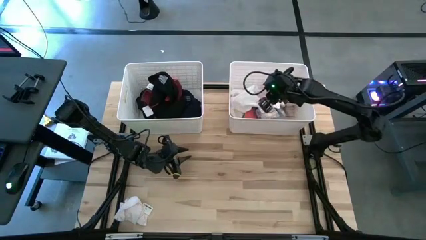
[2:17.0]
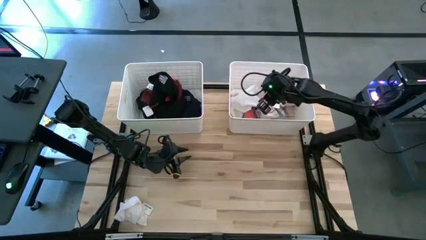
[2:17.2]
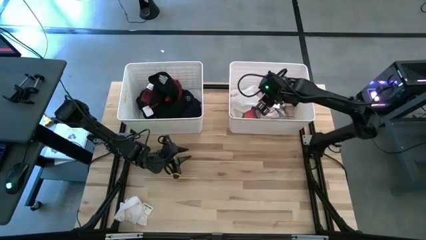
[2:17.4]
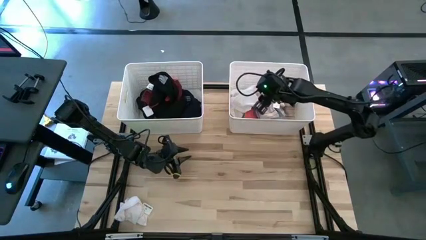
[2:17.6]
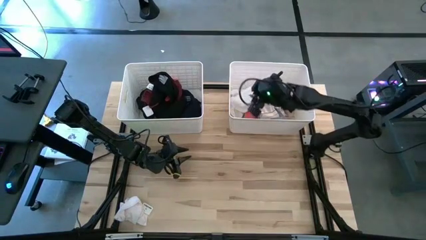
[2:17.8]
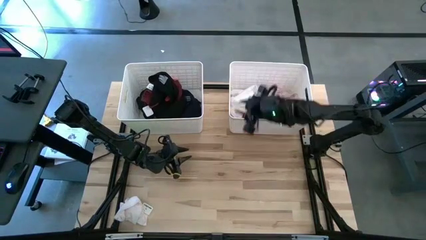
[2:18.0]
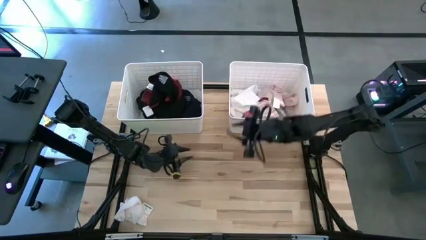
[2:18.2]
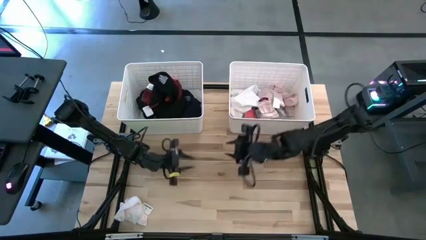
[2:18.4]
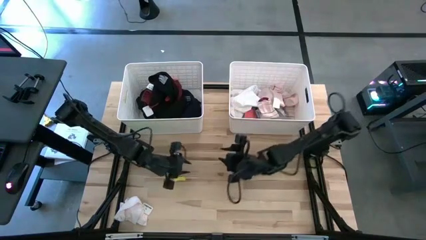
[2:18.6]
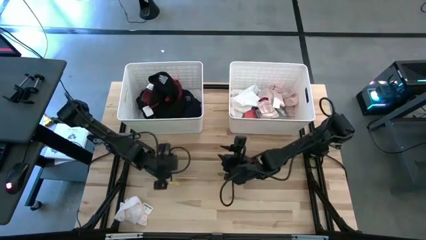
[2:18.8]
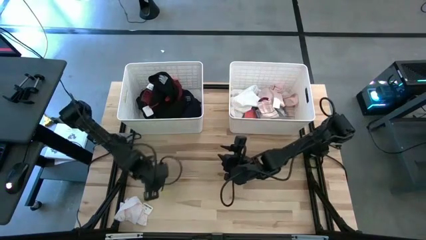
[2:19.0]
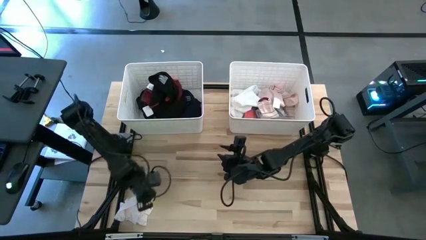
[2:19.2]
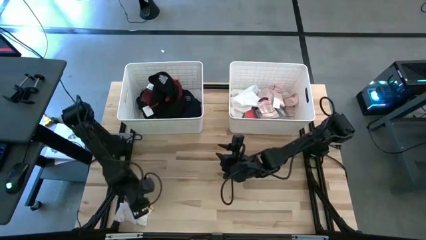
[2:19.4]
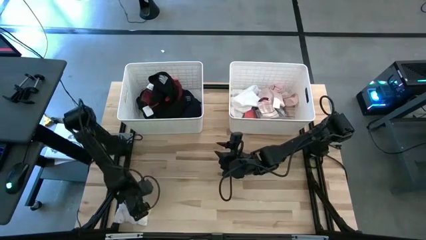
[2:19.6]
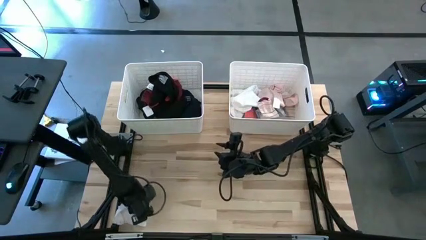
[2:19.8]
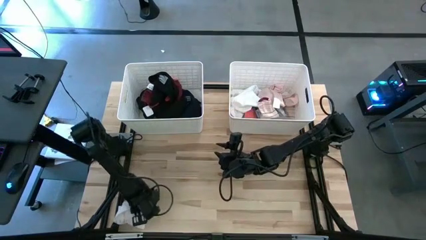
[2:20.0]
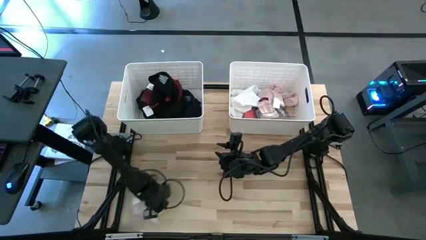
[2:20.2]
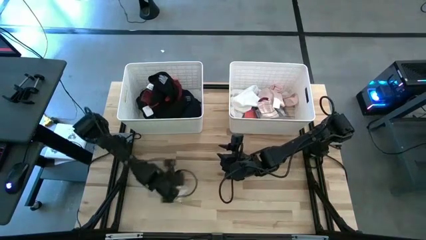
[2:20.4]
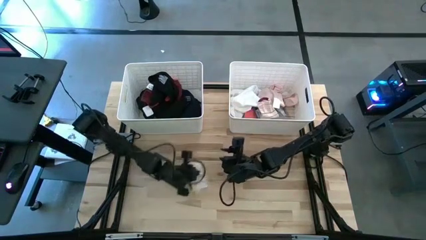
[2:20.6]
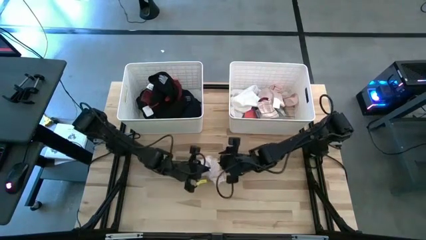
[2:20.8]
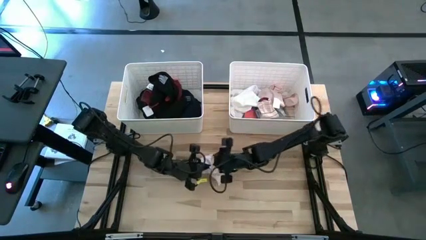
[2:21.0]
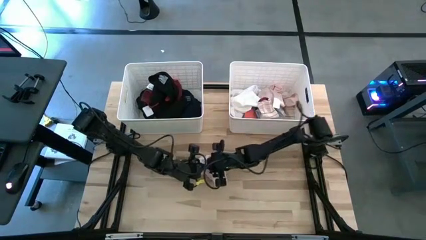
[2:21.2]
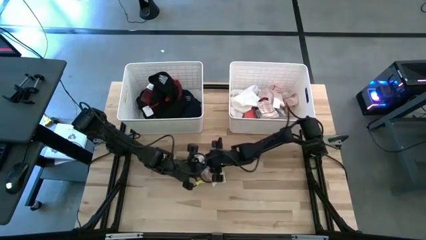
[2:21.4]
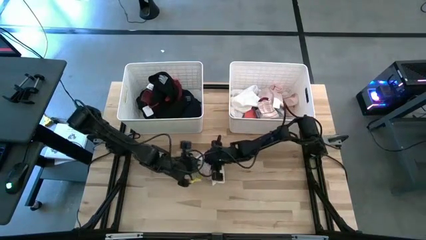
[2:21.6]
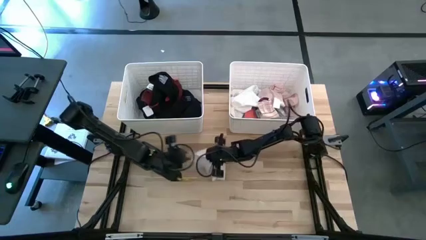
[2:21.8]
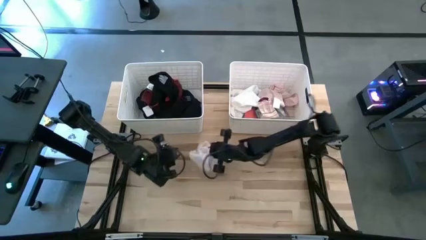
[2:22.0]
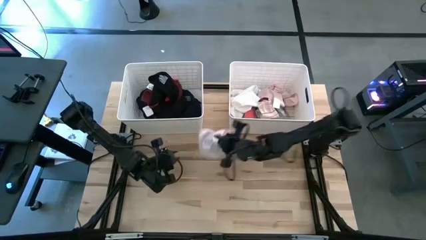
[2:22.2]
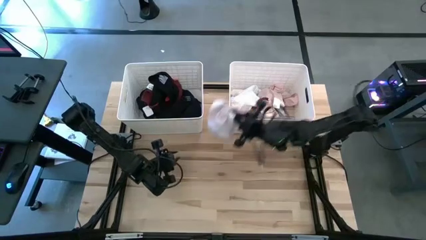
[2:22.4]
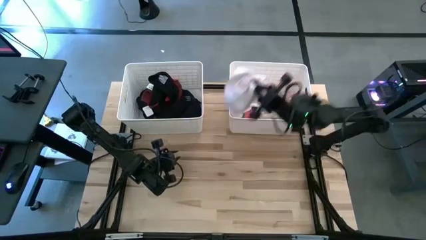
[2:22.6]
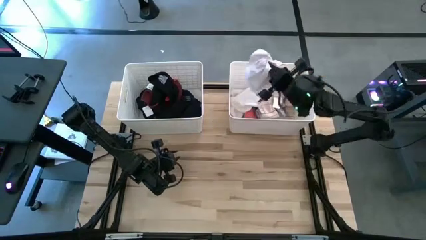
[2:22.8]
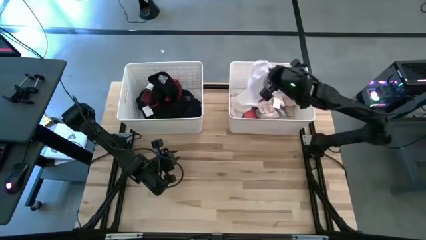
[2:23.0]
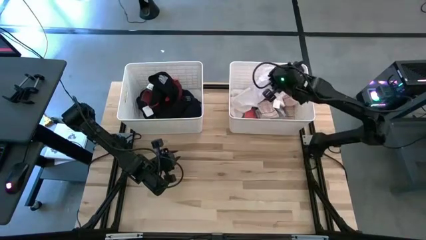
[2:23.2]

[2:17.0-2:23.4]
Task: Sort clothes
Put the pink underwear into the right white laundry bin

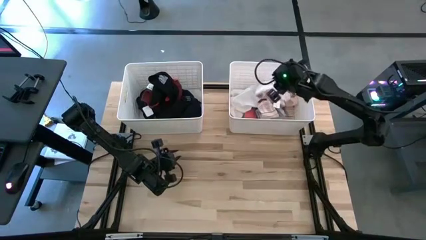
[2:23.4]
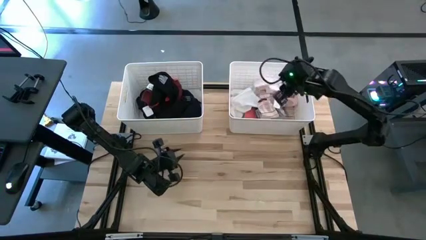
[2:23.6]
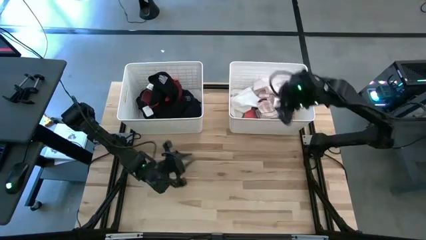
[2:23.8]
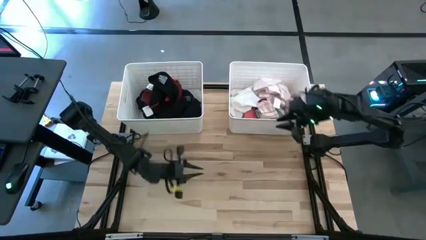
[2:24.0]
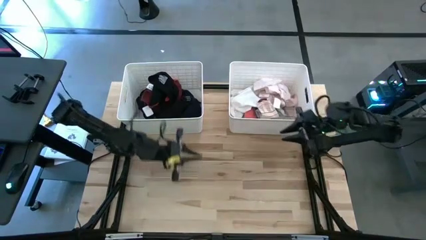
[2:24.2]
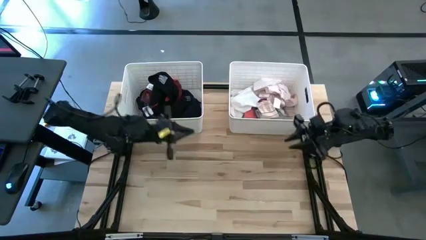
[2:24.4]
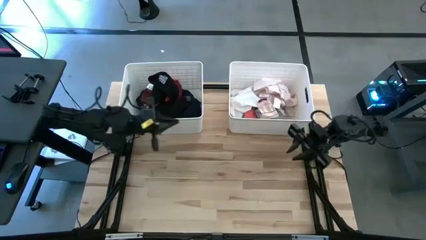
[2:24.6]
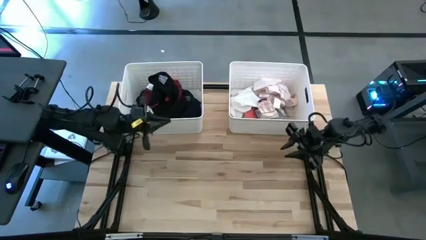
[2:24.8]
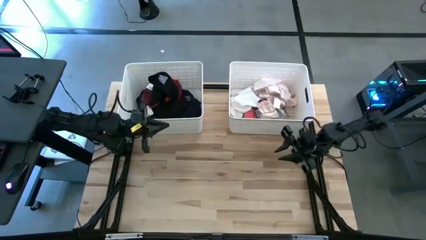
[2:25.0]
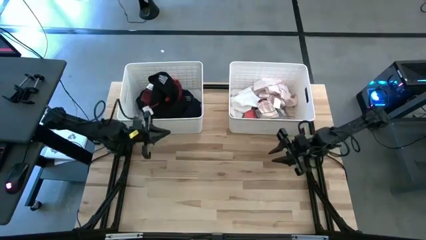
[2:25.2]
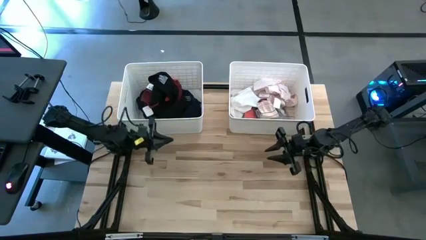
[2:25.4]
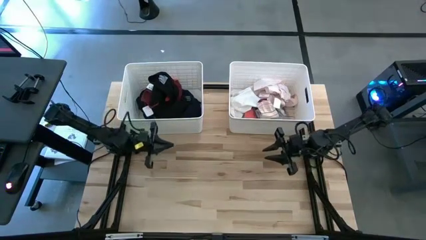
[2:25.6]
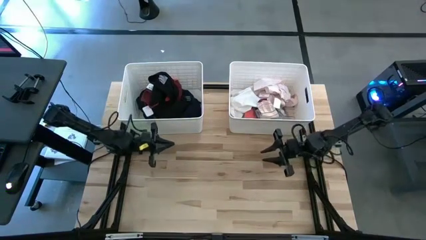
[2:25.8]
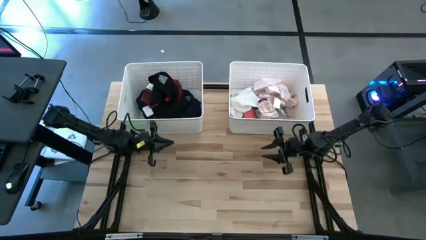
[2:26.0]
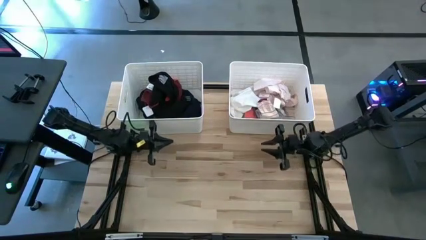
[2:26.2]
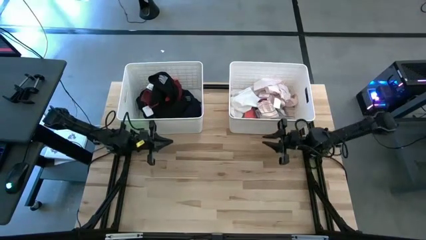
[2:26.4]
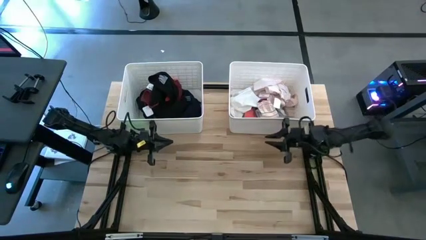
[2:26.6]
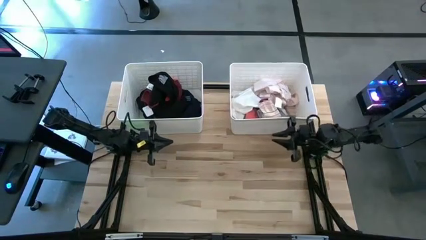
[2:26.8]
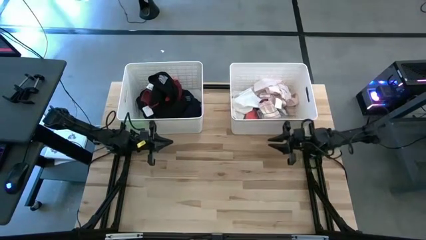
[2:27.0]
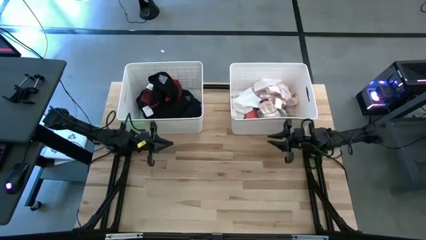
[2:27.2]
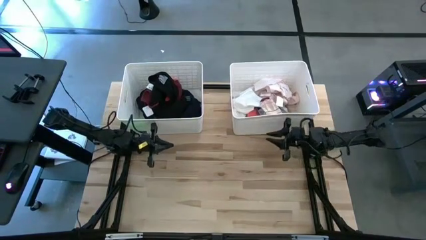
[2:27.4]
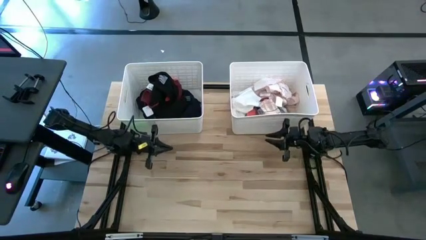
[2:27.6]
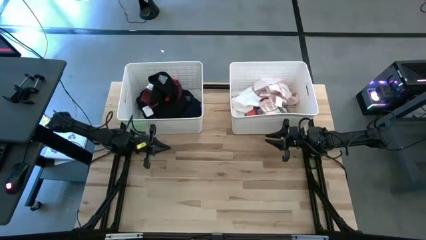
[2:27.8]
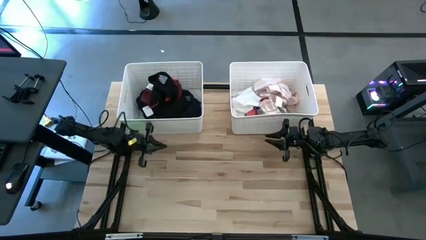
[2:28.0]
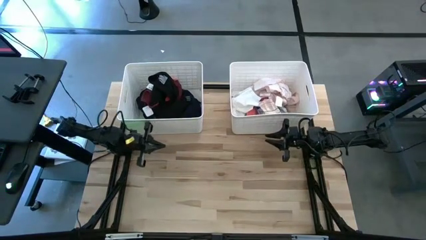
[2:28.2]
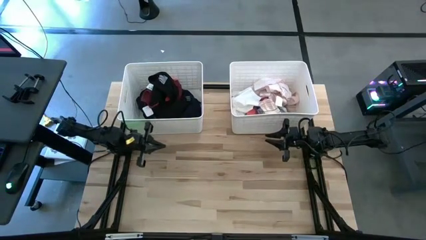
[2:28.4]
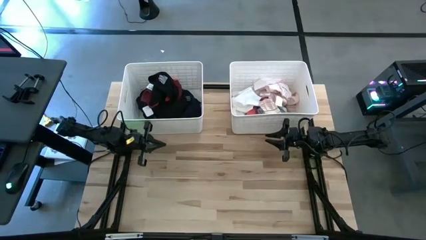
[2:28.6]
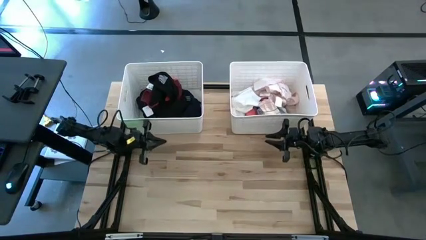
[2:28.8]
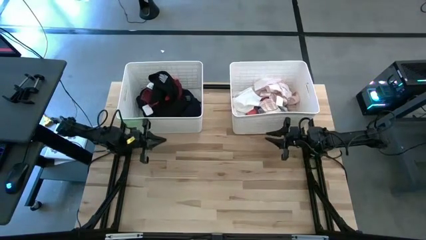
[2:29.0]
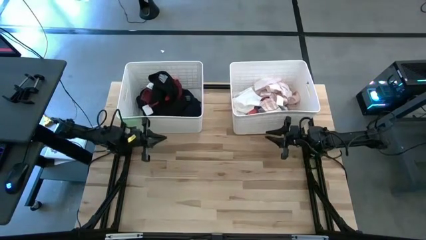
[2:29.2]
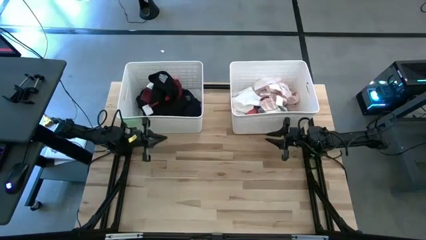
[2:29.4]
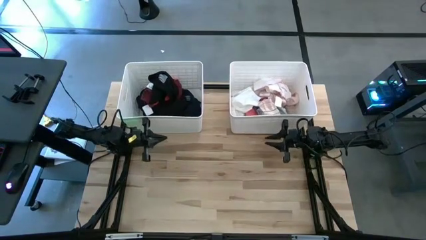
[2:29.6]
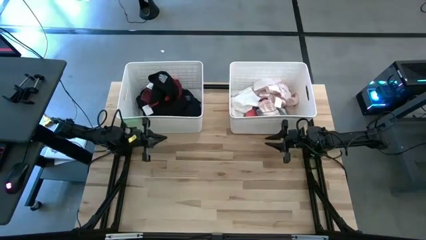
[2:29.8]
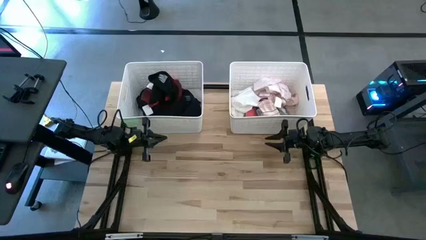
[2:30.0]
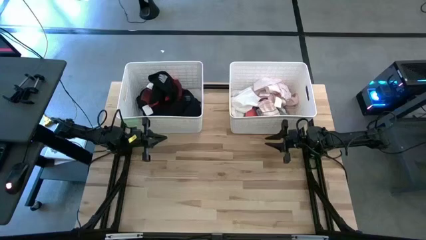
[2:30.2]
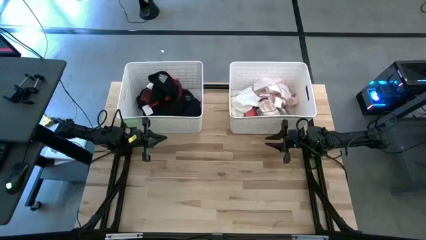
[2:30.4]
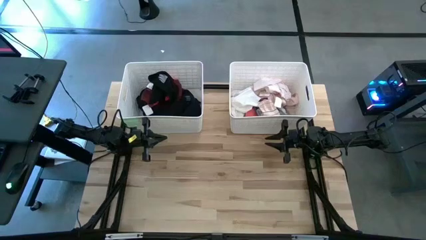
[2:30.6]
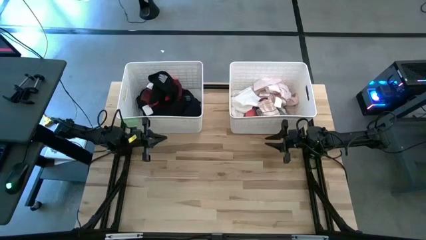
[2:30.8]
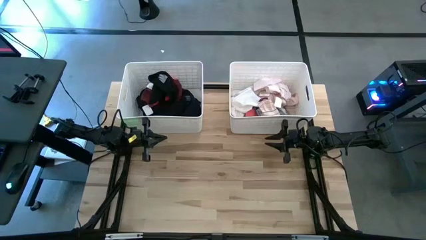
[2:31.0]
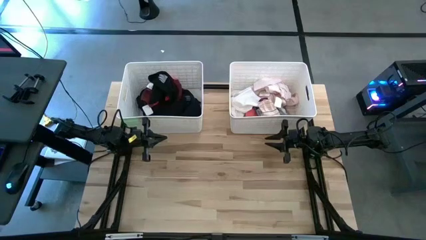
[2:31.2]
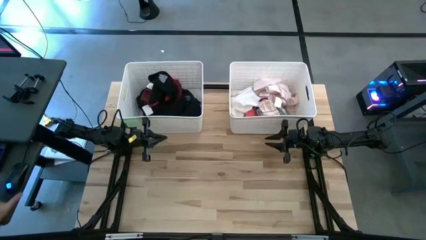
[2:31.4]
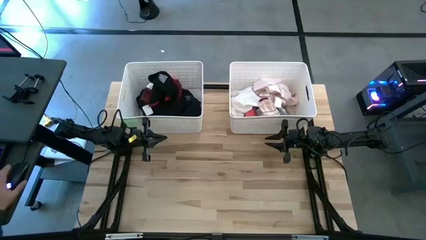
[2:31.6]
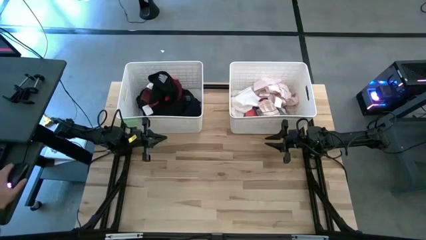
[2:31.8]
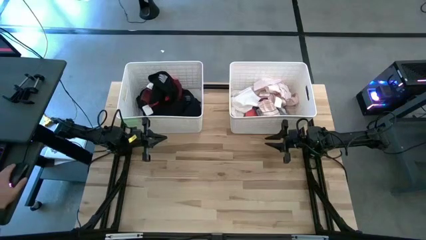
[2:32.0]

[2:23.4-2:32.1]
Return to Home Position

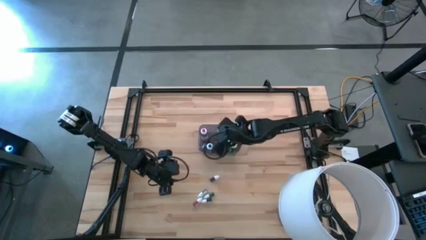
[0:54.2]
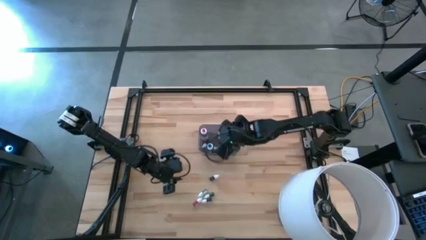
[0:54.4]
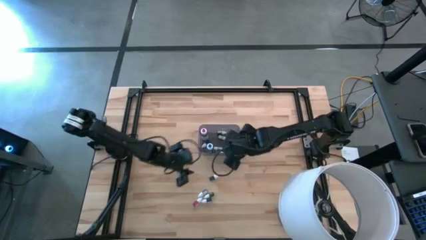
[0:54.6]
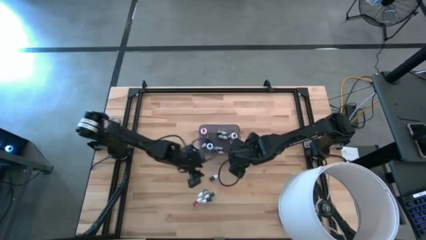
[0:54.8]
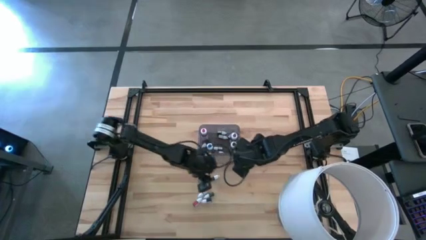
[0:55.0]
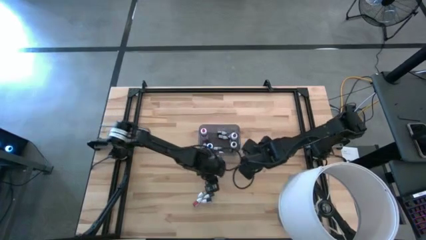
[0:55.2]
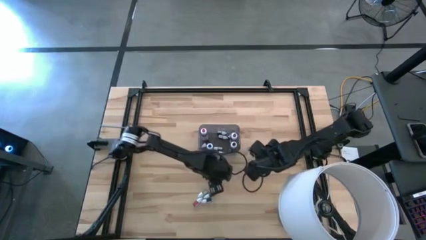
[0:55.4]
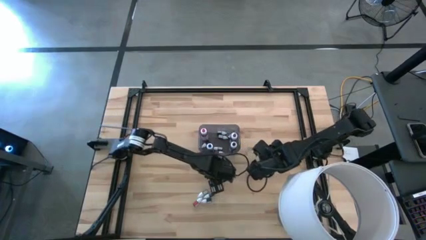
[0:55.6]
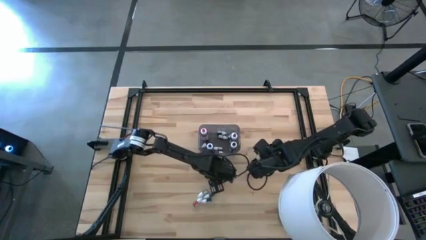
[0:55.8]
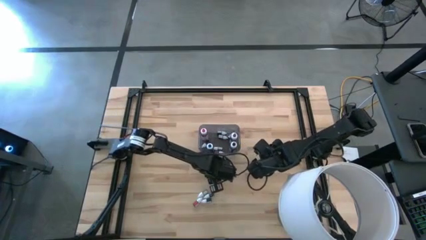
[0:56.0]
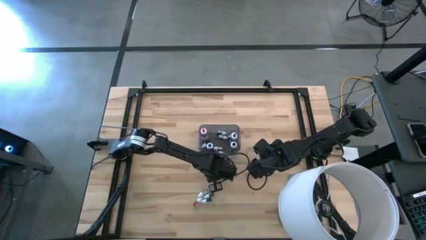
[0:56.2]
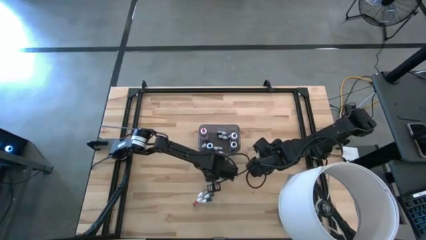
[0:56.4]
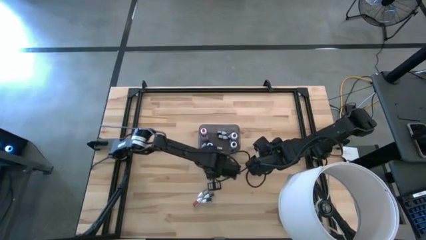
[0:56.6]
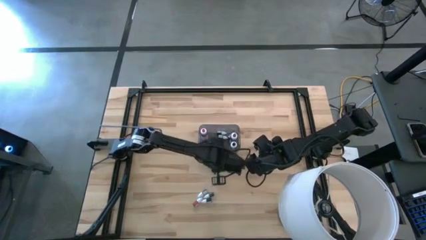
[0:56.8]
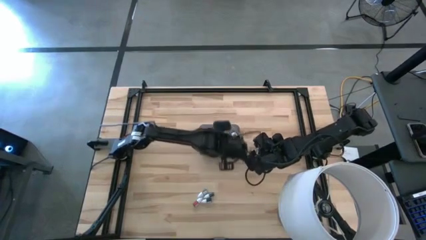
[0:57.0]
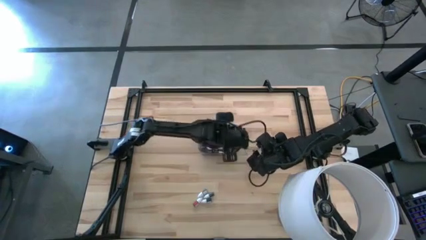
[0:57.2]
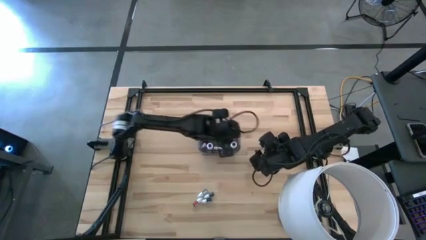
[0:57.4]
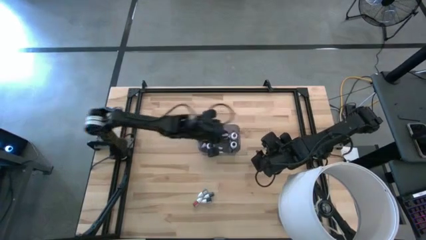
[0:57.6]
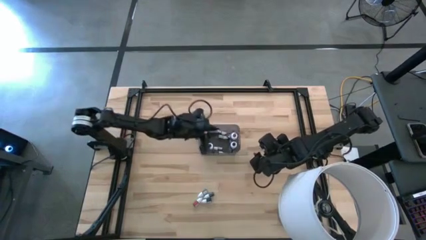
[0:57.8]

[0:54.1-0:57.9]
Task: Pick & Place food coloring
Put the small green food coloring bottle in the black bin
